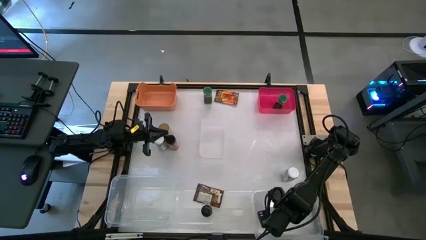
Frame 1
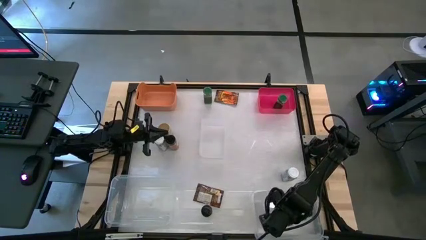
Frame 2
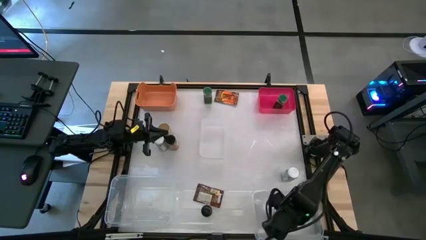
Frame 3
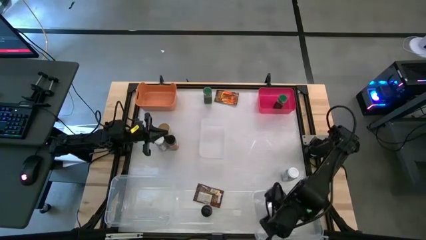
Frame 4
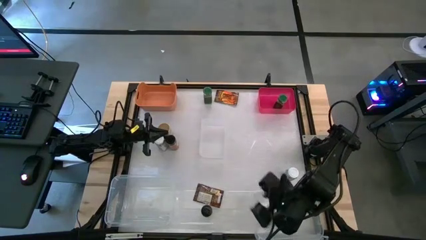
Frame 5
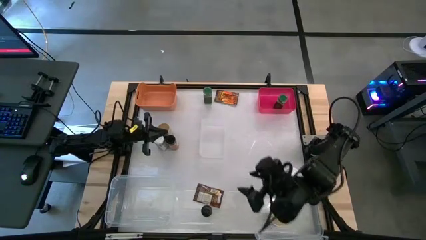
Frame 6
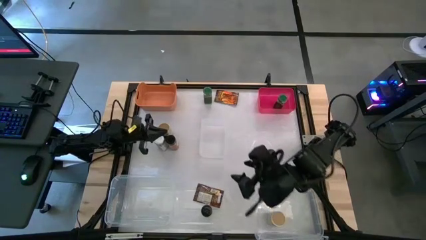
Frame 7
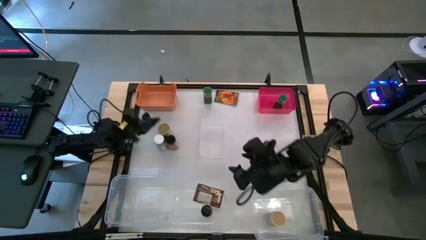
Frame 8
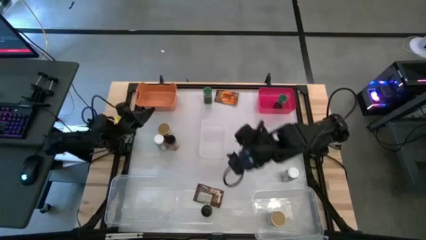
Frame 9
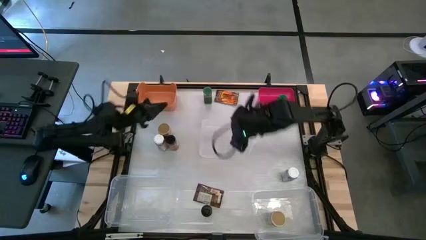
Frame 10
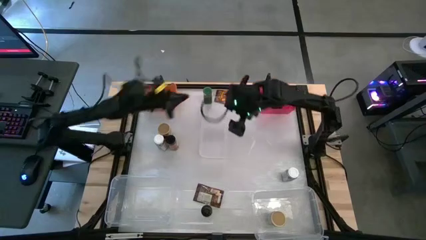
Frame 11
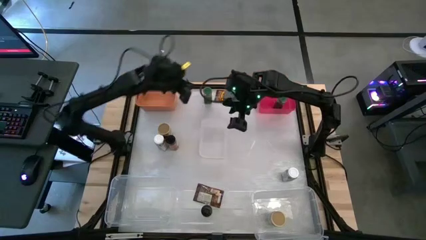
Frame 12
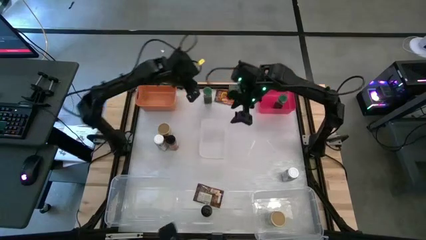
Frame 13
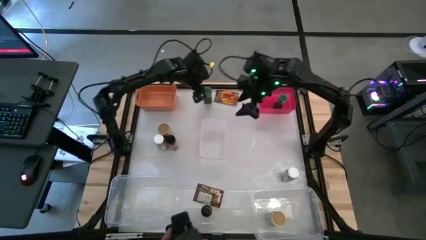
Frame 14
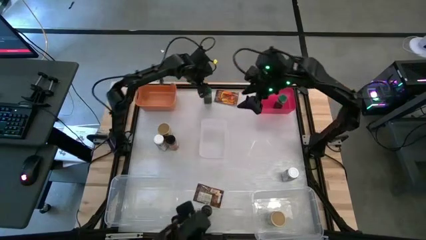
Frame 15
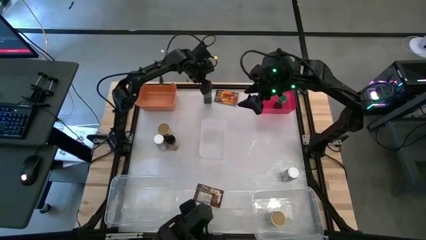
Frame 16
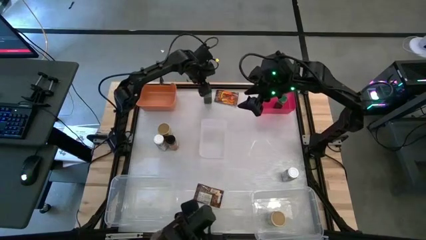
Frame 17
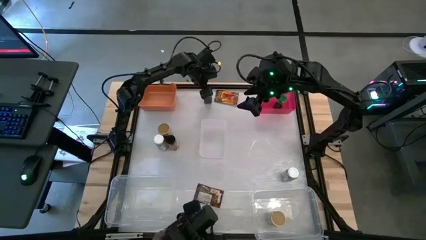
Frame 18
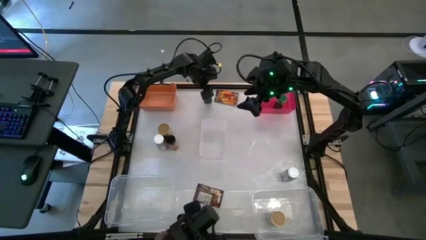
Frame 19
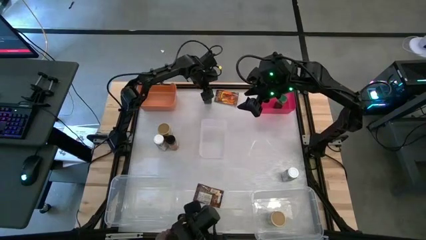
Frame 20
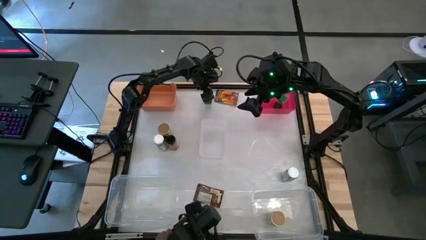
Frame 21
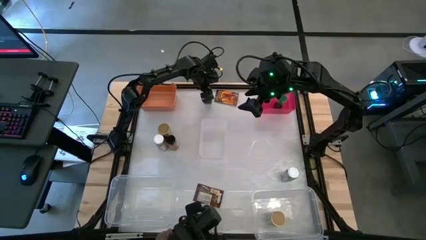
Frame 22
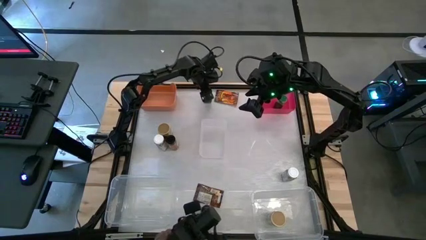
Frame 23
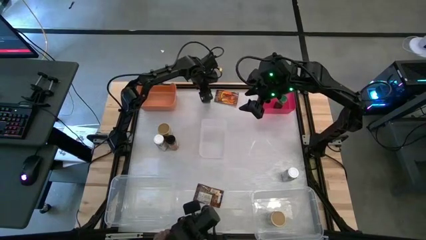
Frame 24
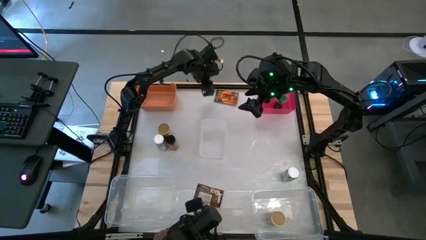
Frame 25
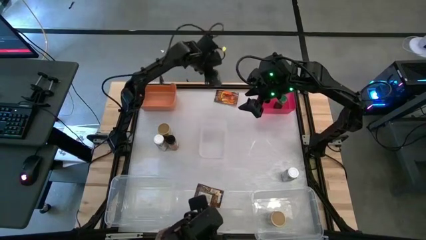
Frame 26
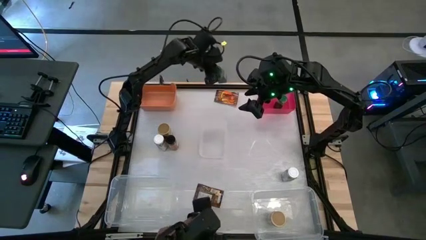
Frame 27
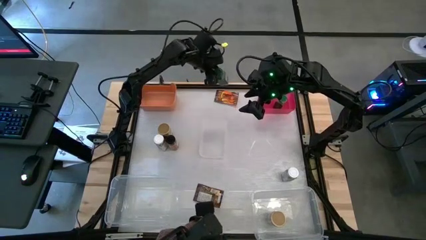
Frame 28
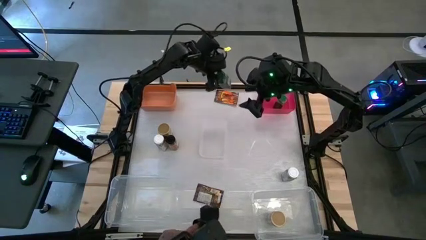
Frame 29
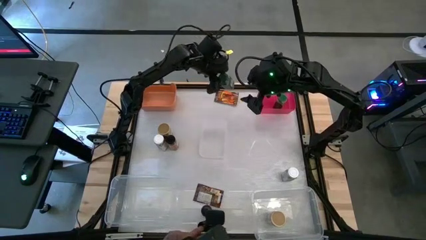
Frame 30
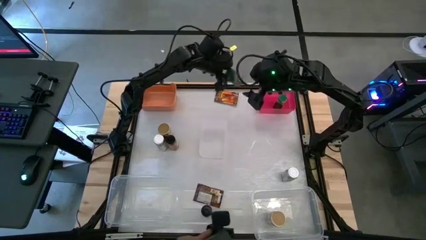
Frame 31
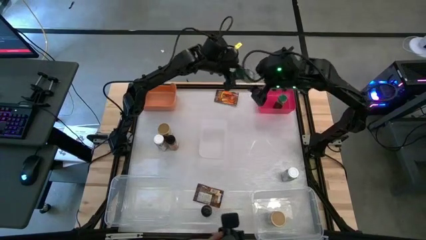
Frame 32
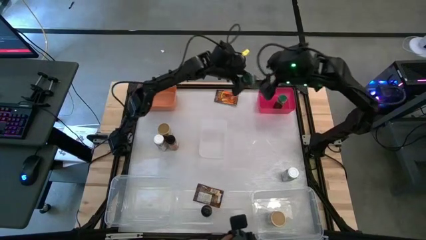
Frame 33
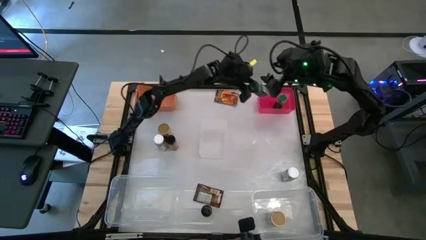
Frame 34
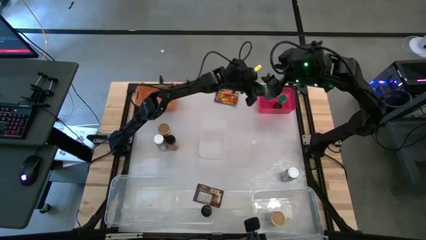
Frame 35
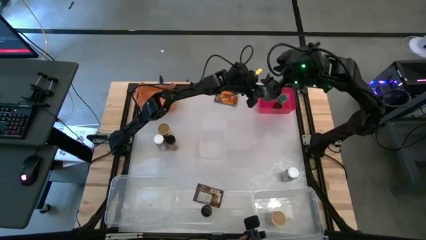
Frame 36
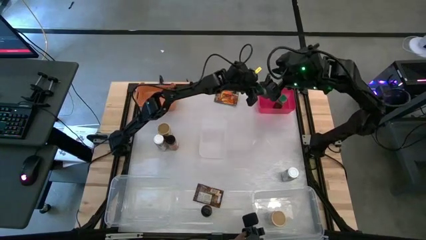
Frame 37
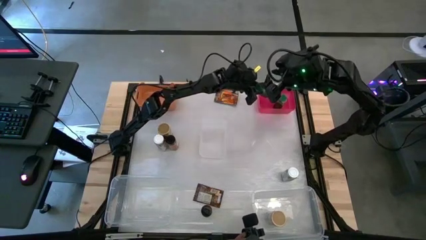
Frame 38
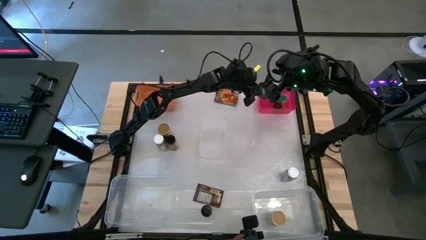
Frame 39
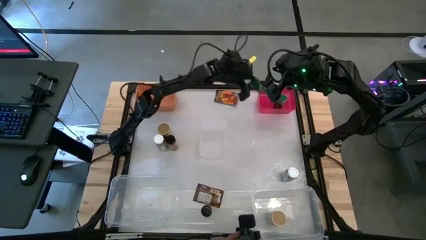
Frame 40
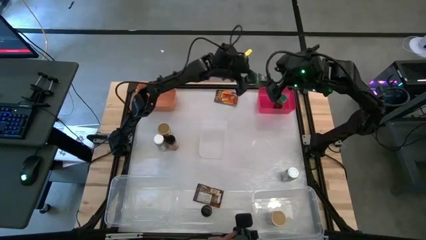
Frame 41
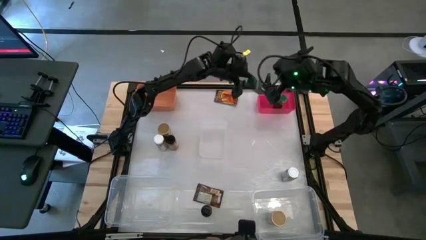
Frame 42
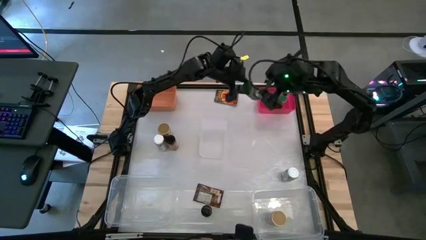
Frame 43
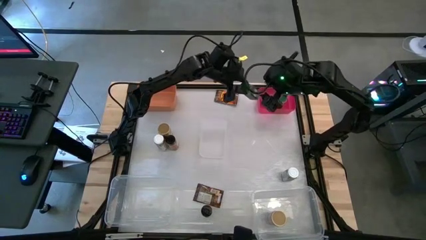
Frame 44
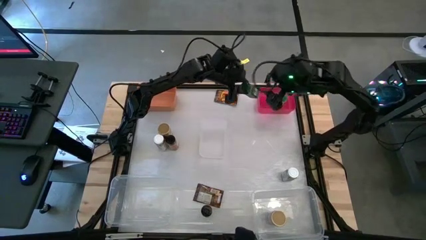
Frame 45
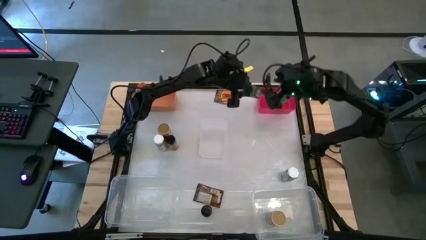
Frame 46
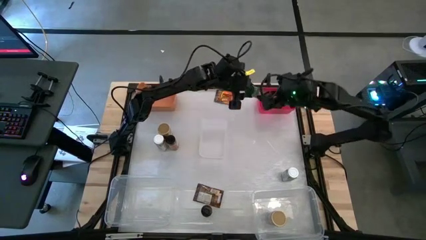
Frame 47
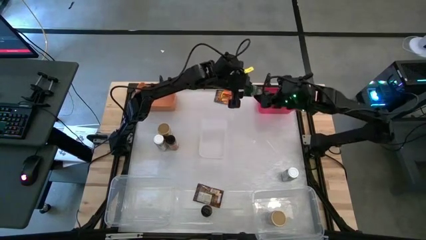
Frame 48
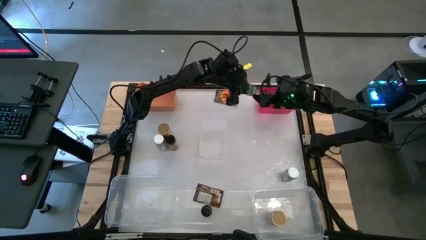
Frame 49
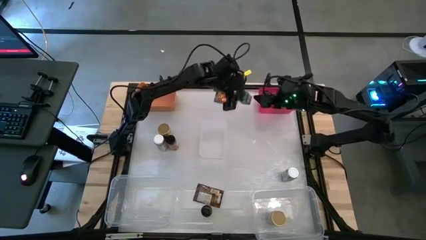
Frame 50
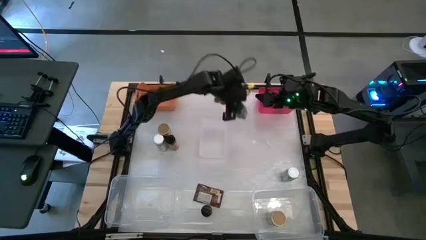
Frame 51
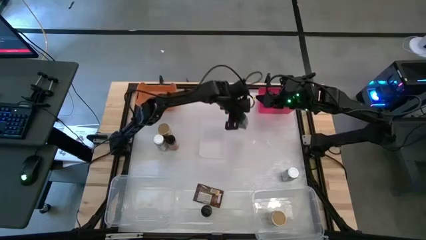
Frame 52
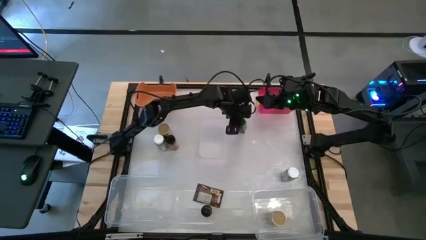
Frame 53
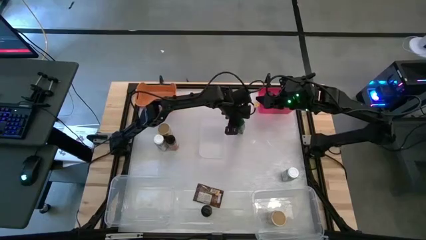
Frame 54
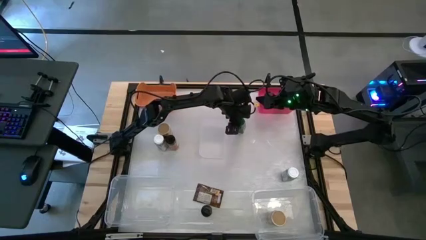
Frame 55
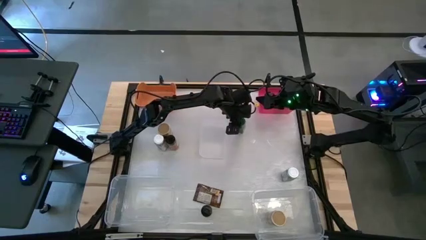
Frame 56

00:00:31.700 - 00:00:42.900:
Task: Sort spices by type
Put the green seasoning bottle into the red bin

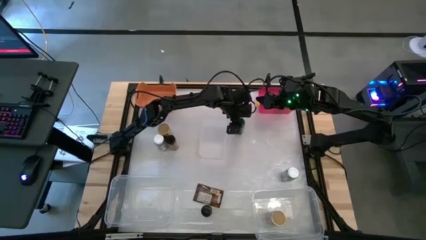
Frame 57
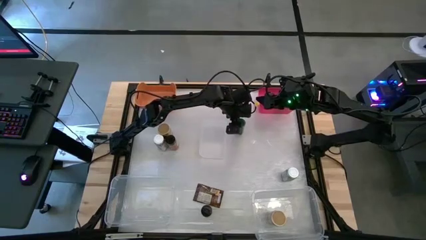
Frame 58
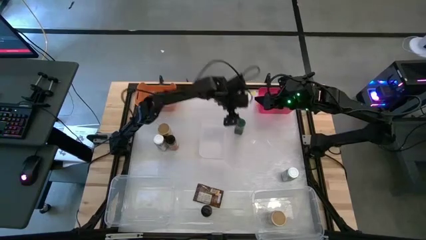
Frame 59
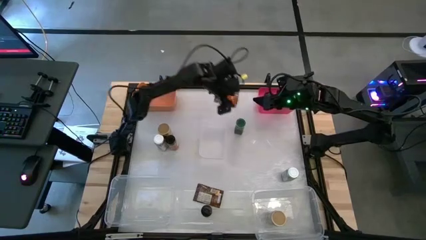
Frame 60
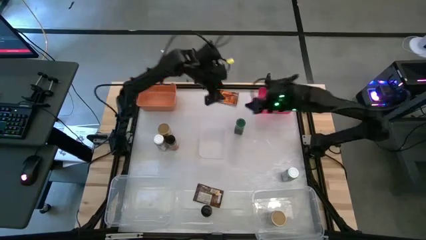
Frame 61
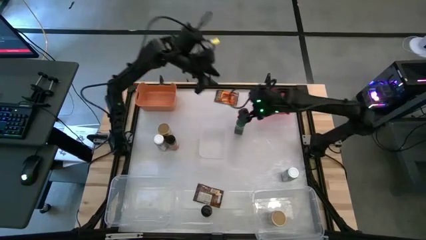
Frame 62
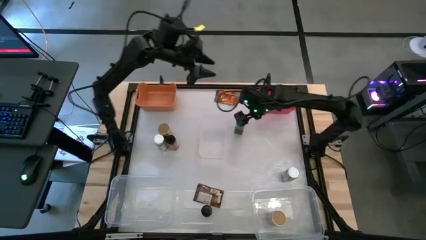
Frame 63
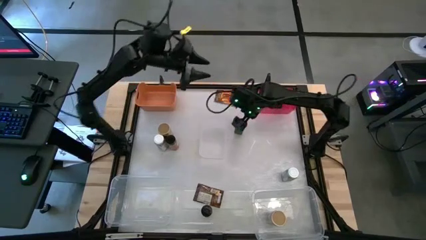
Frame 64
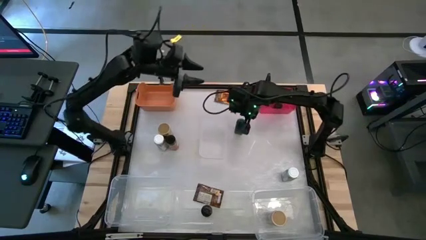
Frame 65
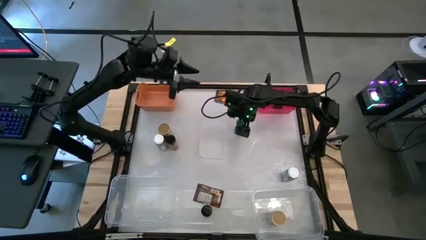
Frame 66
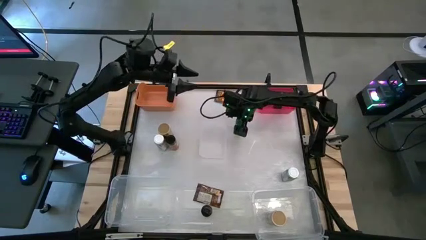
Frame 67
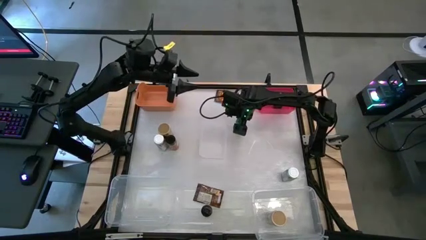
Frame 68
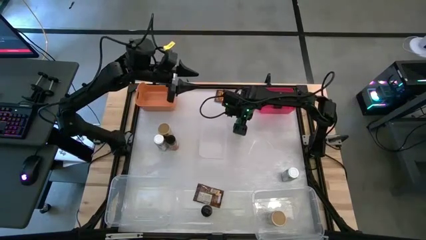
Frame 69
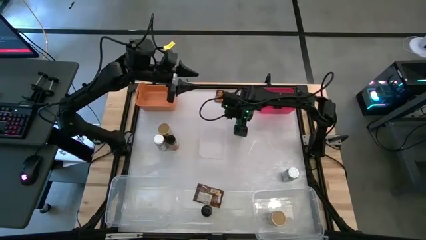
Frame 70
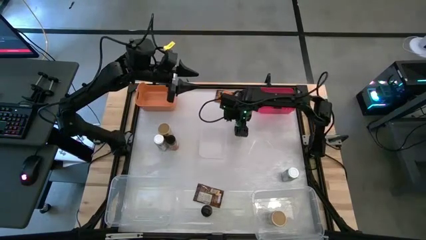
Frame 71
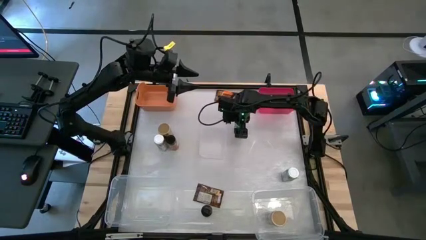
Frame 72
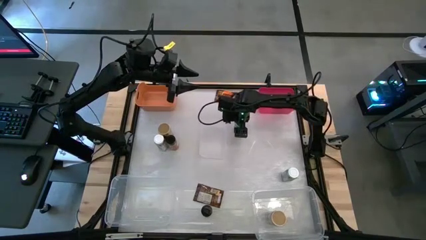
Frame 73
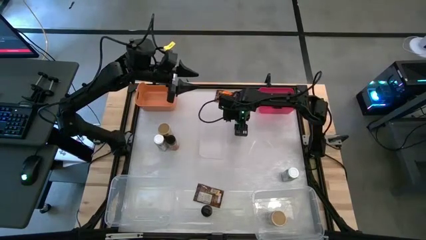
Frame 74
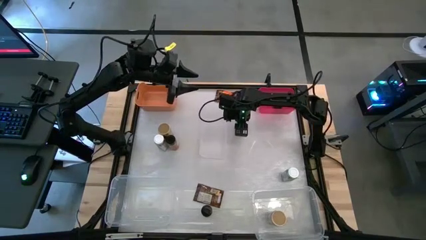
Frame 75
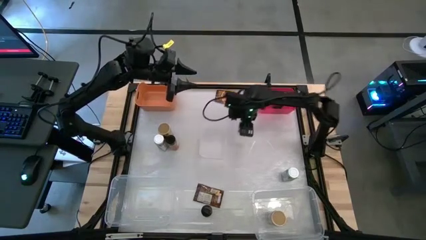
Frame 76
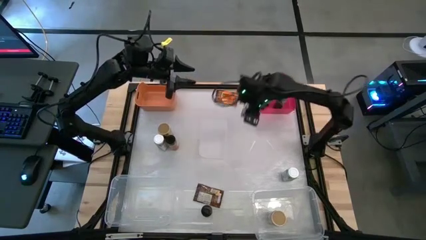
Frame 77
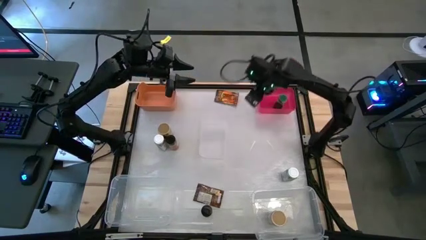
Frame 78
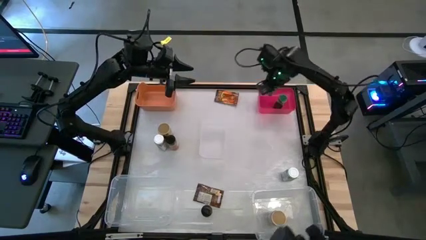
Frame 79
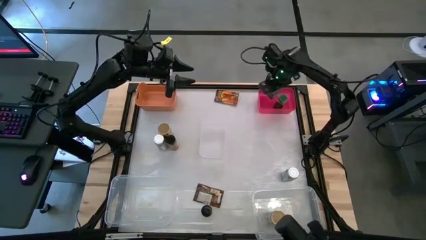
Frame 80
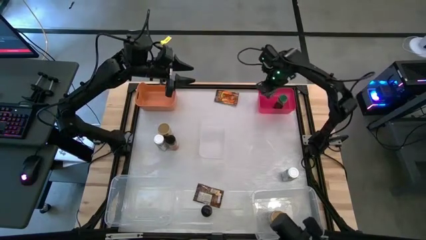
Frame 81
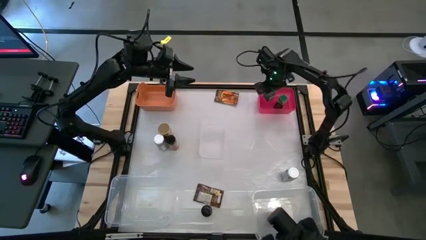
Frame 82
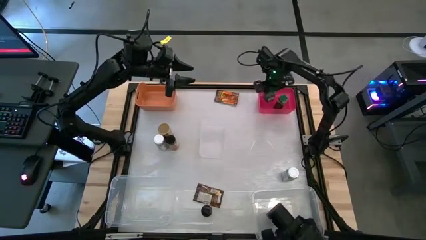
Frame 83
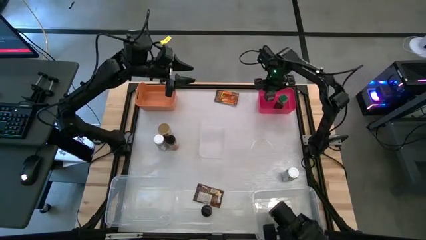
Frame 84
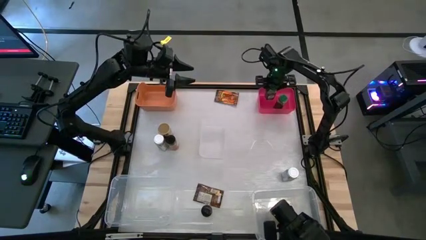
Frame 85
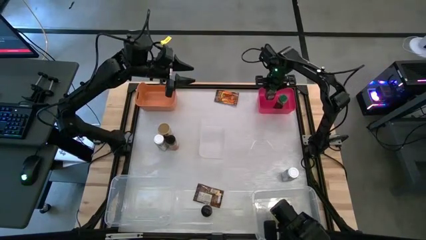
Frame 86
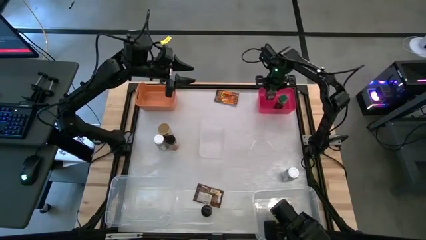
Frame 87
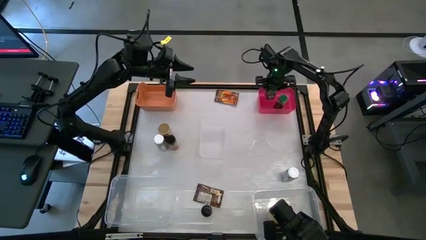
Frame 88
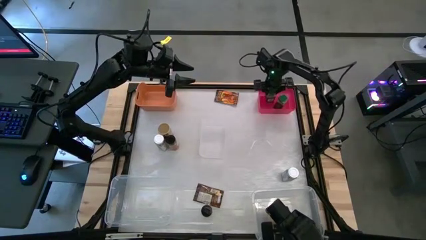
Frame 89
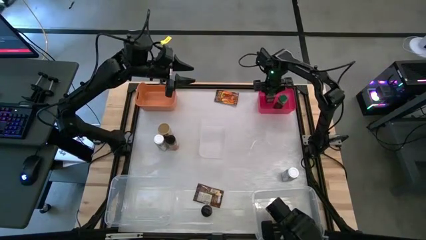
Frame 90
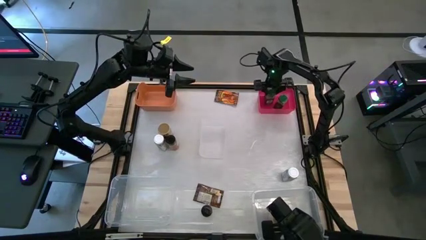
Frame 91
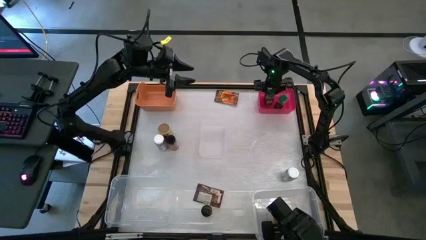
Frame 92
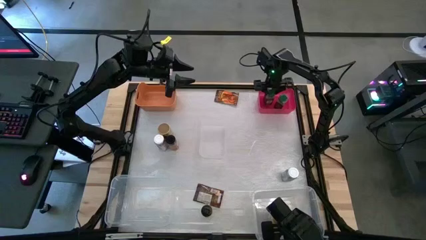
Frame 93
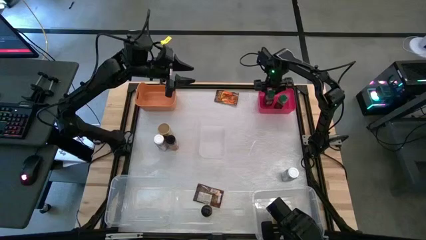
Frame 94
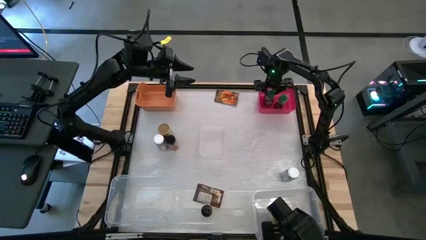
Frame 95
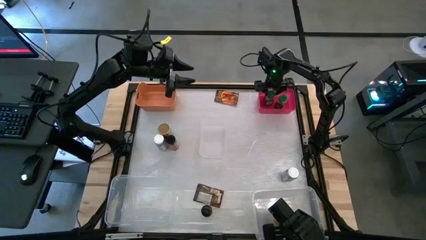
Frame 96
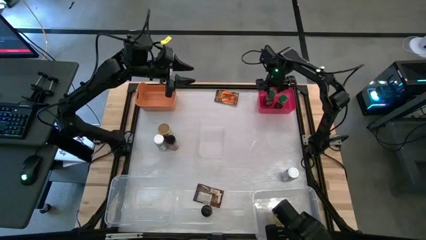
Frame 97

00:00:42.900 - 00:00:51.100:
Put the green seasoning bottle into the red bin
